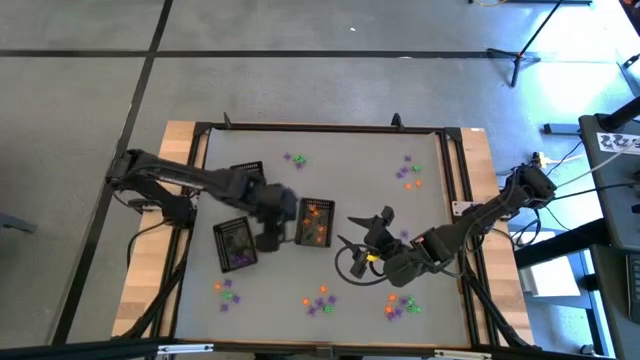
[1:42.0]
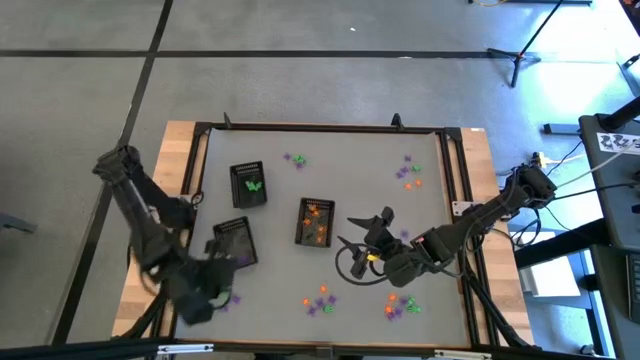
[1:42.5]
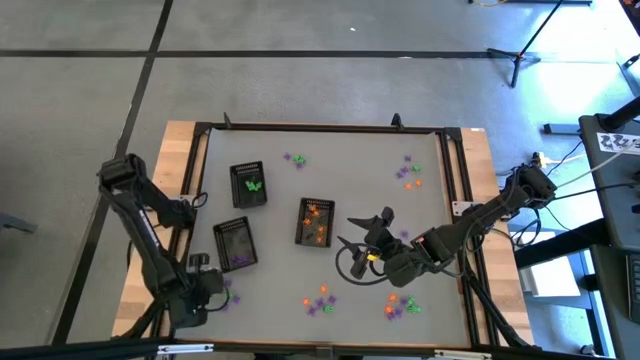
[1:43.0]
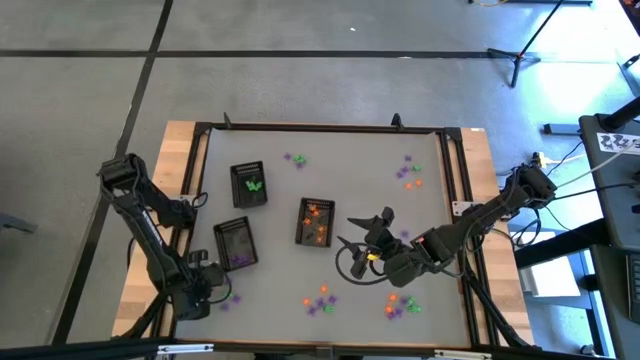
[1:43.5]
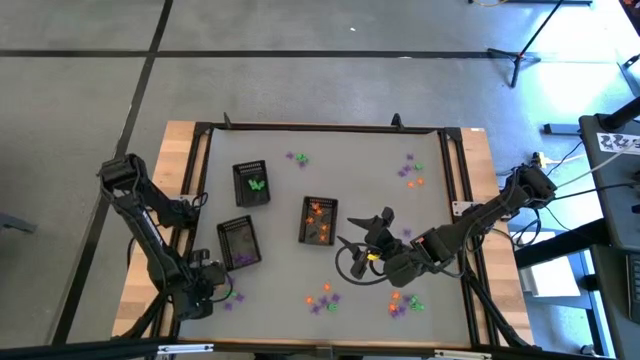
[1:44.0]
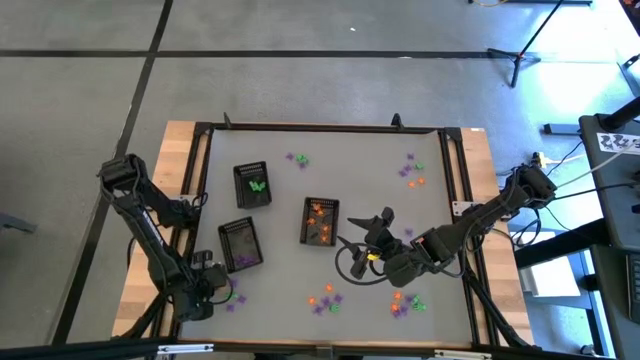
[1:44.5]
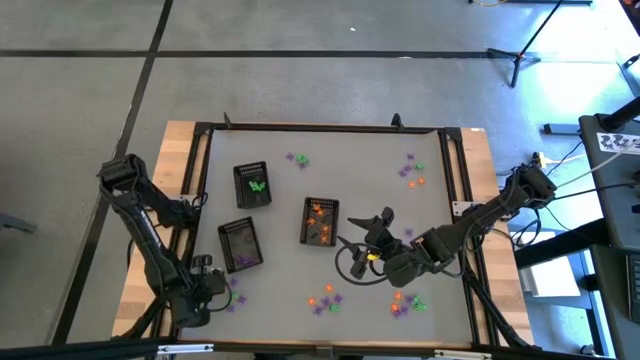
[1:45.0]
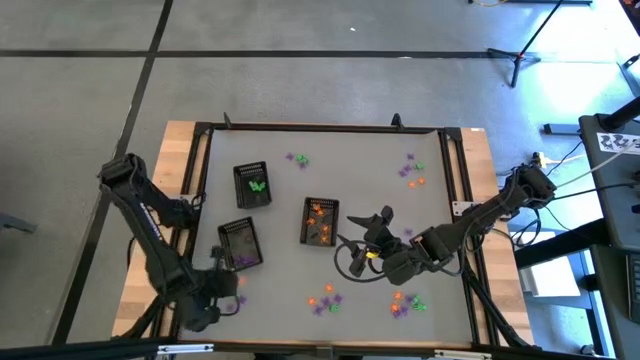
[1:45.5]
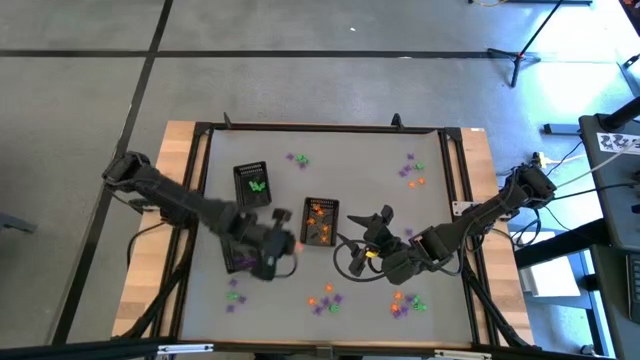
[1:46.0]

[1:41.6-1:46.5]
Task: Sort Halloween decoration
Put the orange spider toy into the bottom right black basket

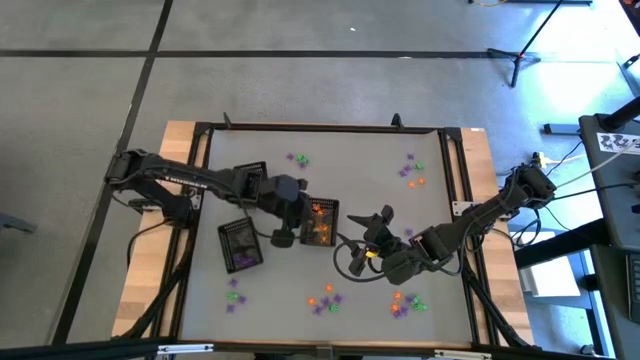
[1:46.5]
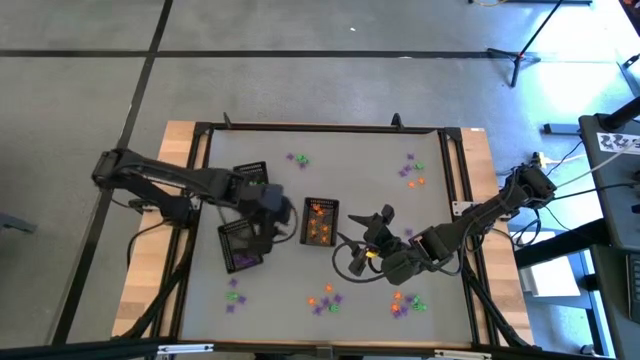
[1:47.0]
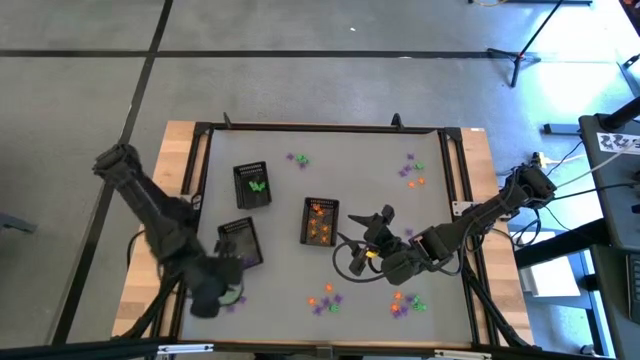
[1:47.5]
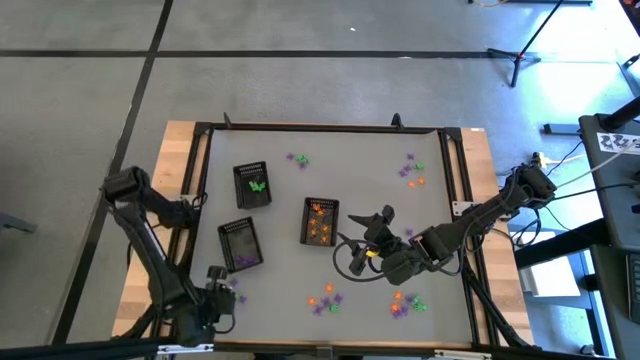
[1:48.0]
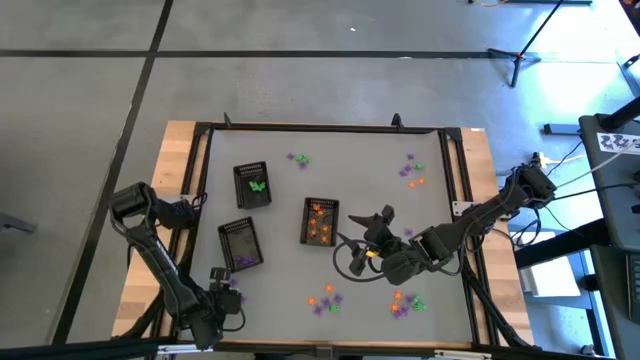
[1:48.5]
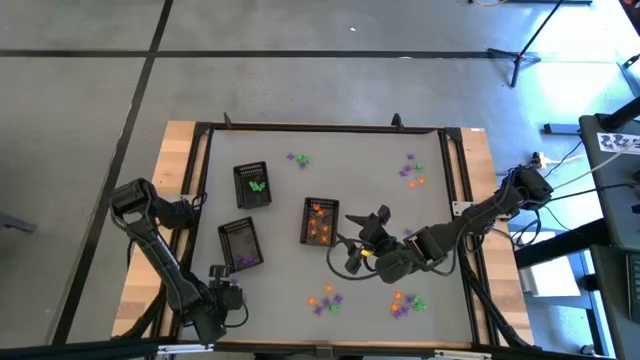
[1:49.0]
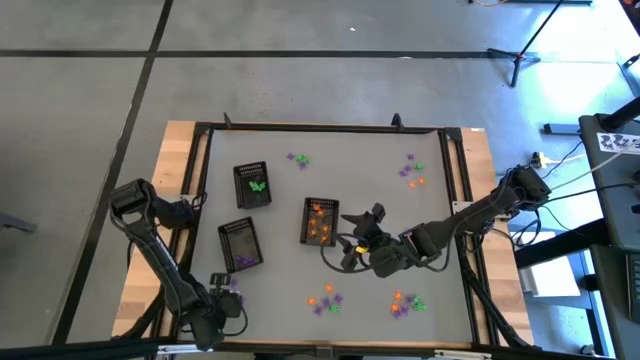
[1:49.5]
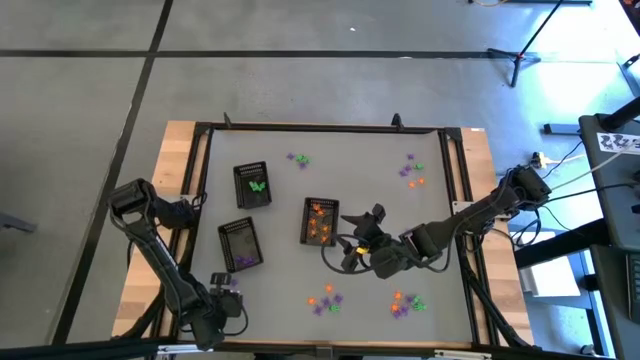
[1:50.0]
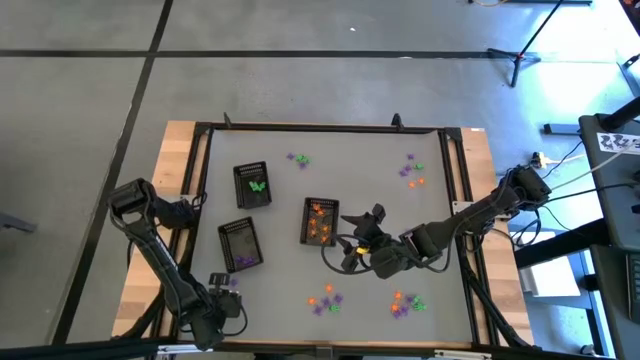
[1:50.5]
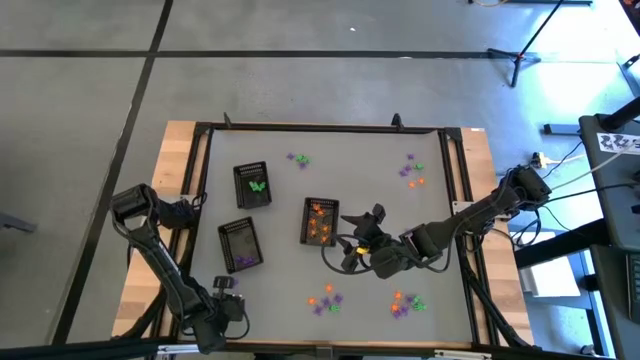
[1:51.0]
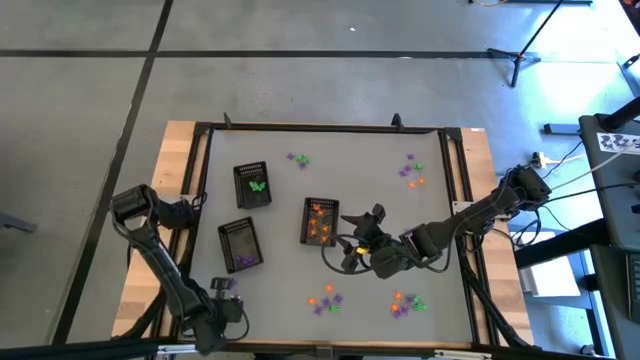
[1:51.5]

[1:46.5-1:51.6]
Put the purple spider toy into the bottom left black basket

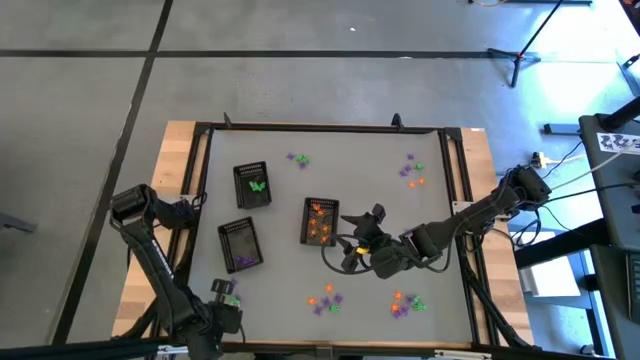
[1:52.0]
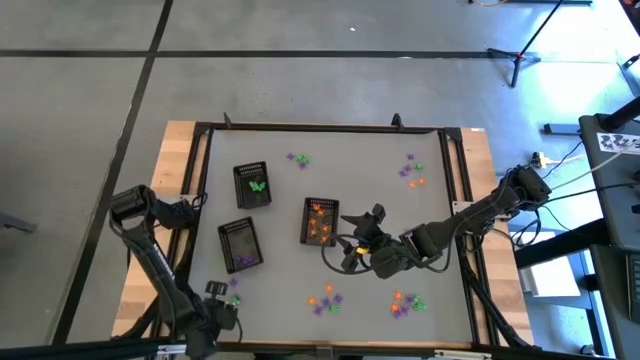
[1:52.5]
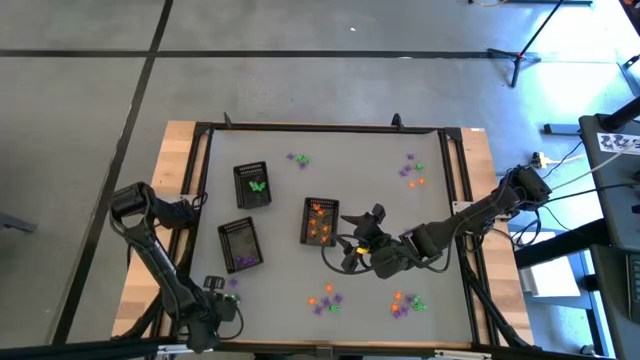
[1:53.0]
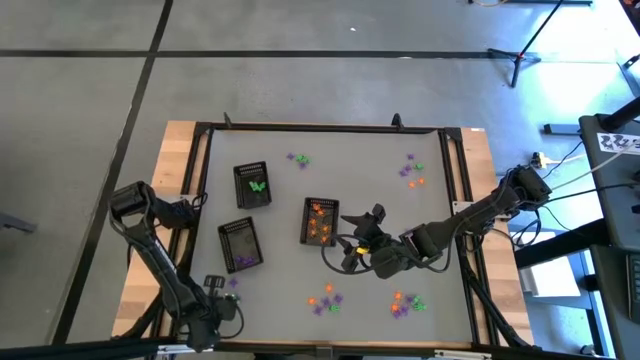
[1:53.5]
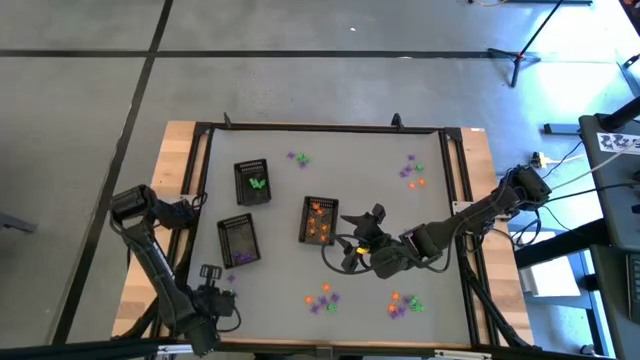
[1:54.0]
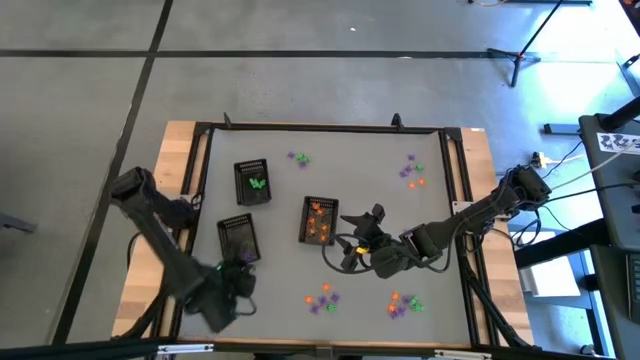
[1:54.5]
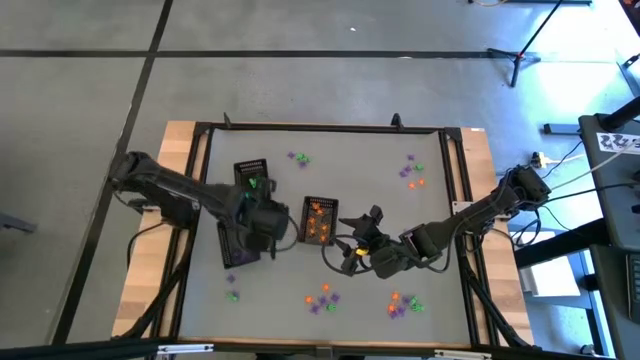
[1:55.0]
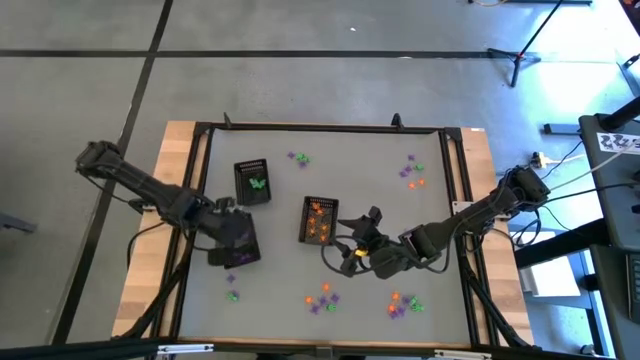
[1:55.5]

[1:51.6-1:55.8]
Put the purple spider toy into the bottom left black basket

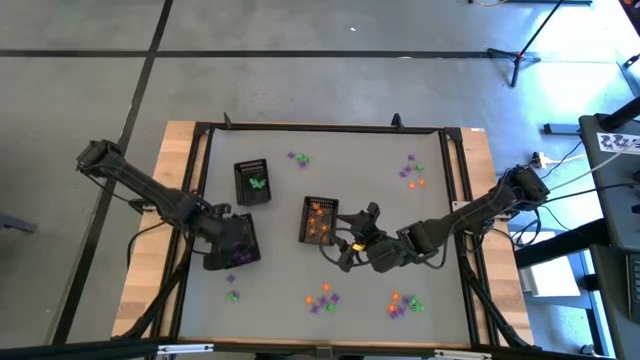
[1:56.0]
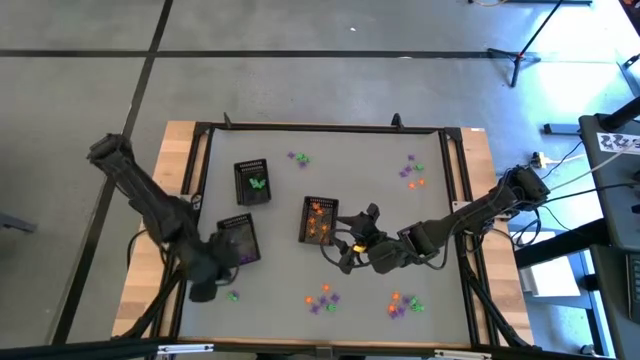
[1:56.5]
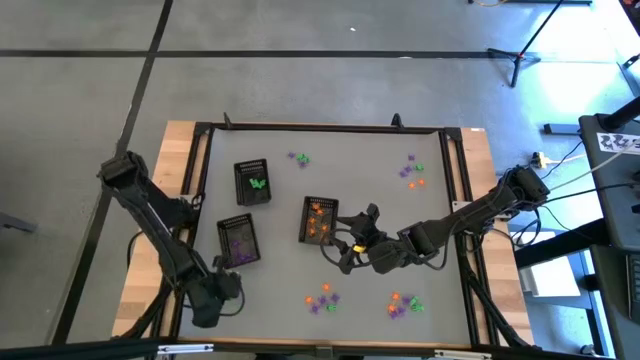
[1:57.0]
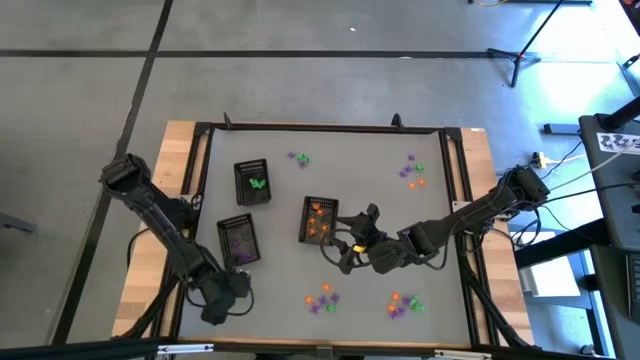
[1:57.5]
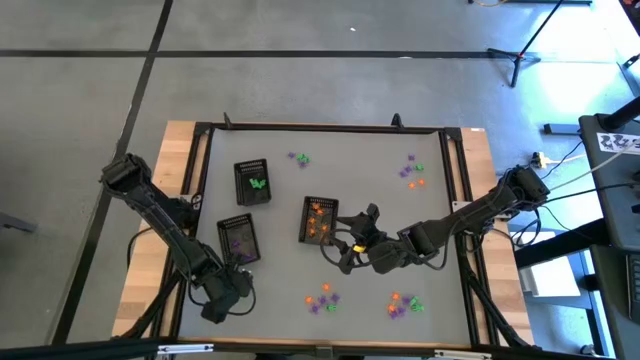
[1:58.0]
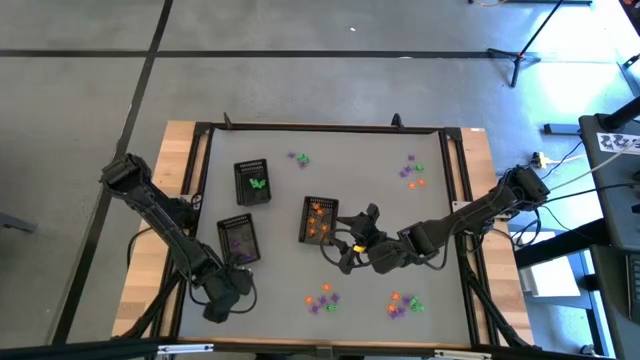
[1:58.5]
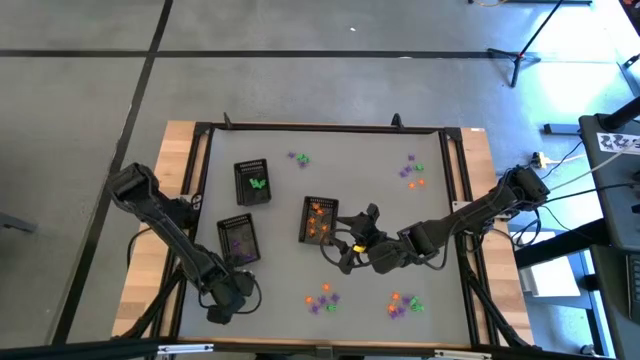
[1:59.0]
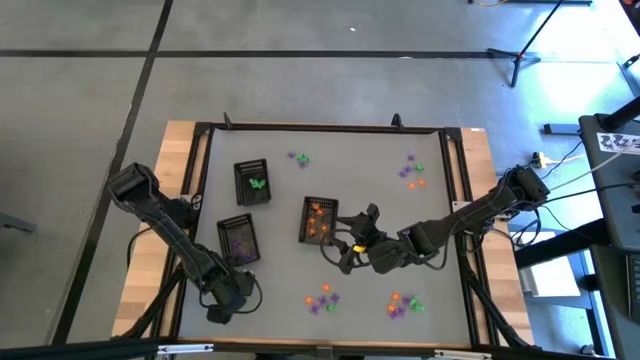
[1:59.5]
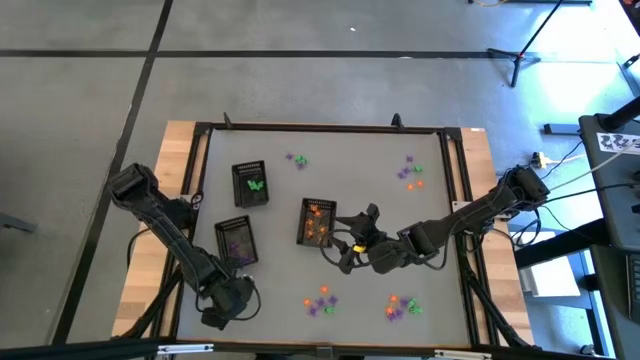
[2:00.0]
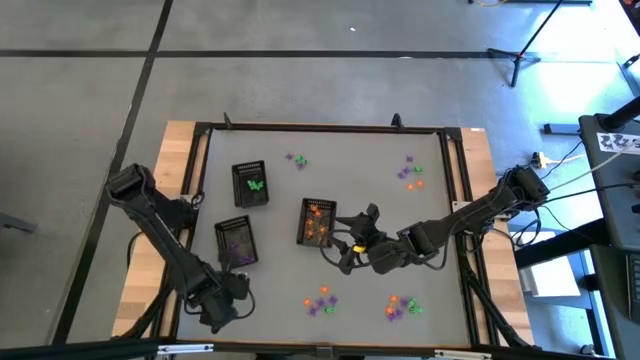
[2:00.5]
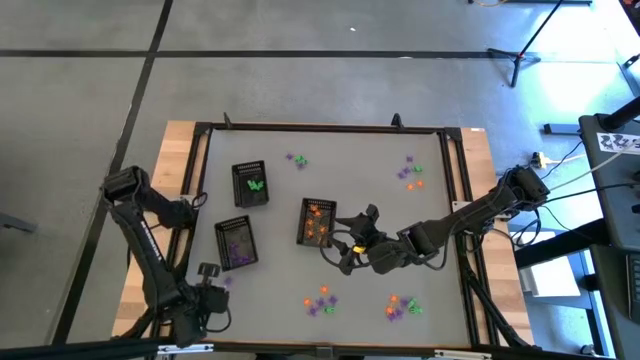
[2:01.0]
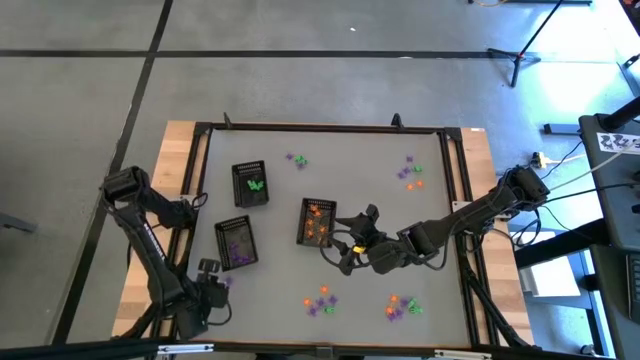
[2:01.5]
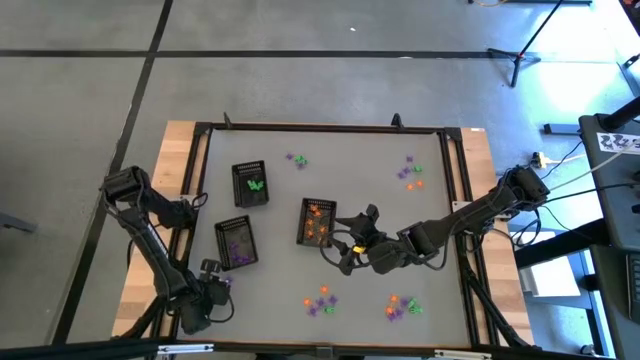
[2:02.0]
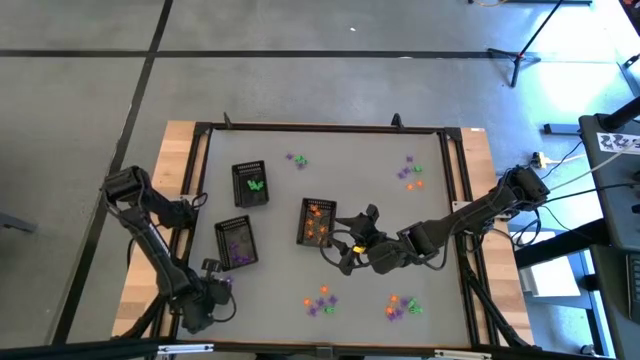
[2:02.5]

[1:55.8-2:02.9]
Put the purple spider toy into the bottom left black basket

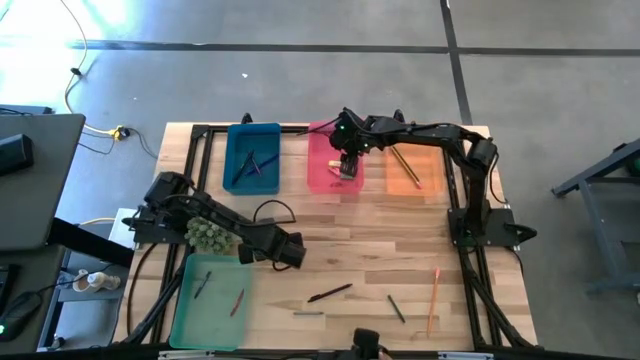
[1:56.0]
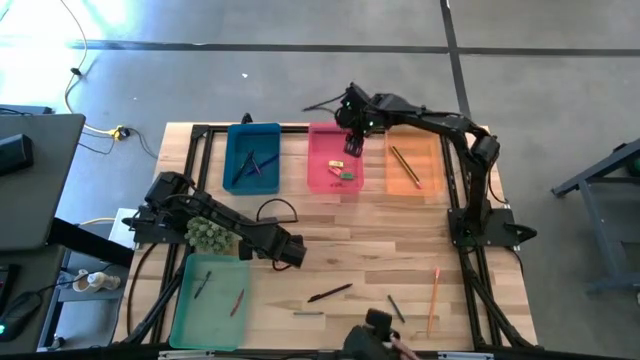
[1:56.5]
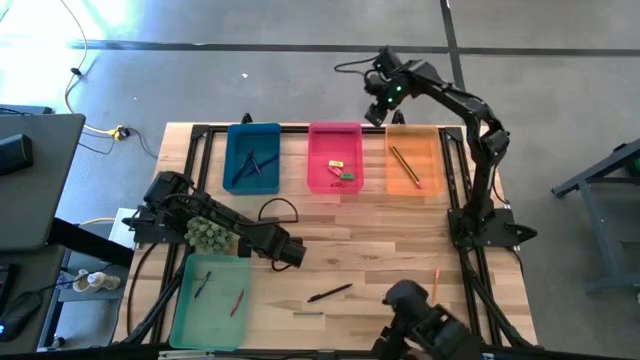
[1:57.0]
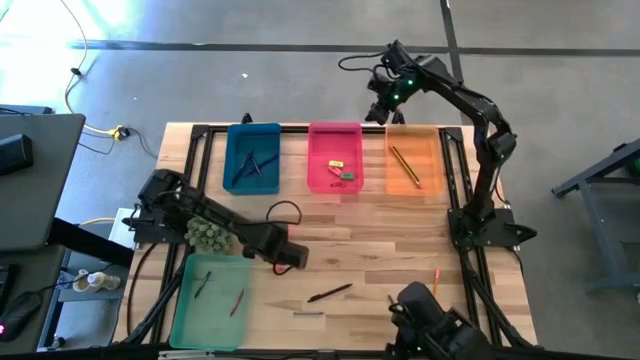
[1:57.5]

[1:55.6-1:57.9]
Task: Sort crayons/erasers/pens/pencils in bins
Put the pink pencil into the orange bin
